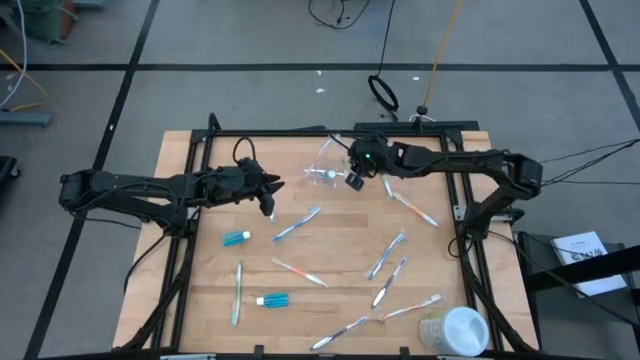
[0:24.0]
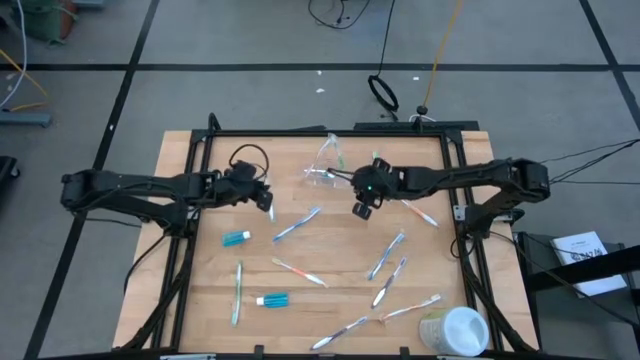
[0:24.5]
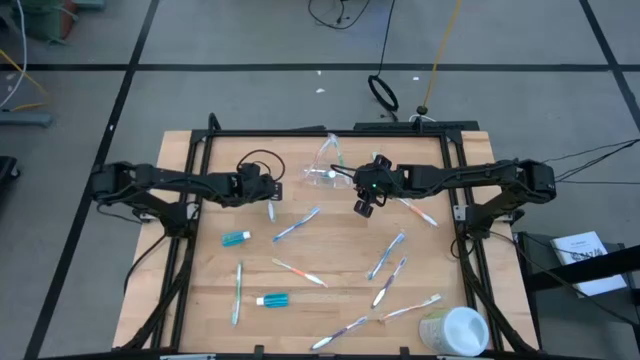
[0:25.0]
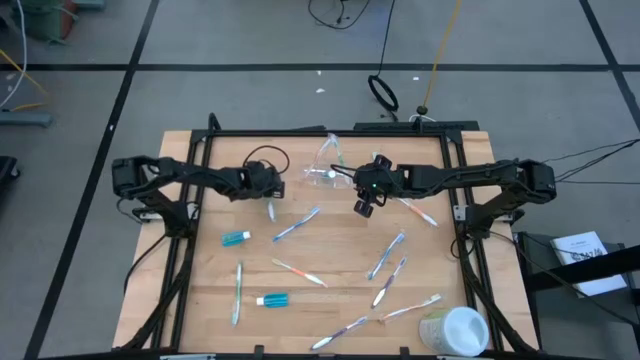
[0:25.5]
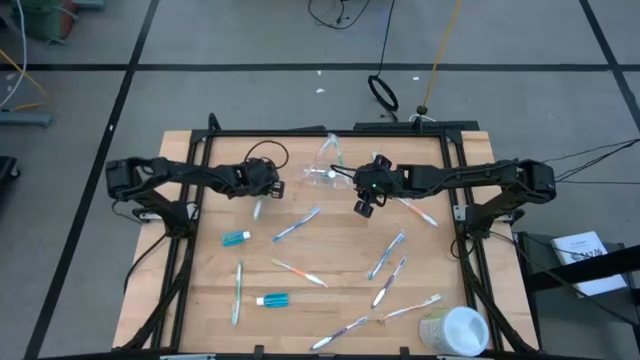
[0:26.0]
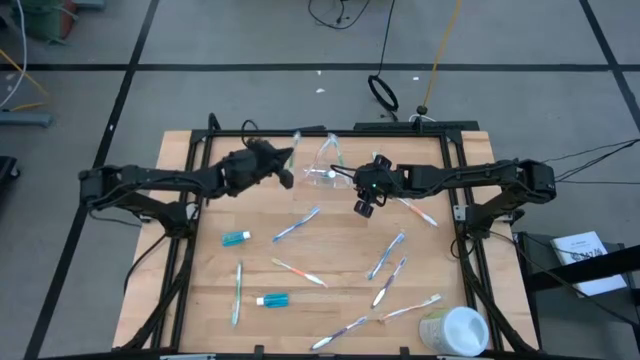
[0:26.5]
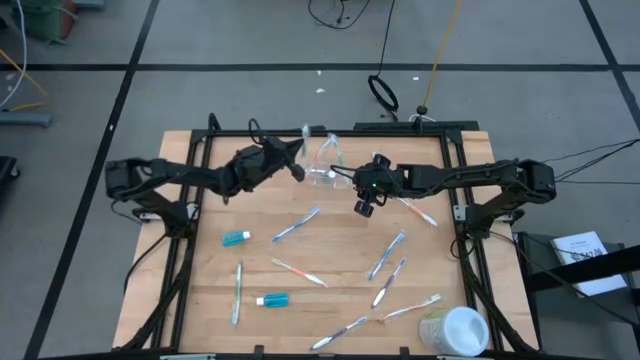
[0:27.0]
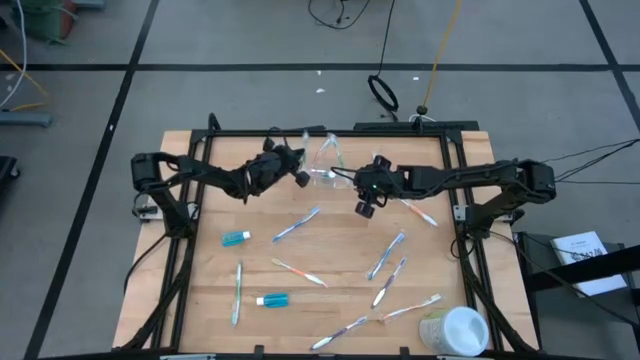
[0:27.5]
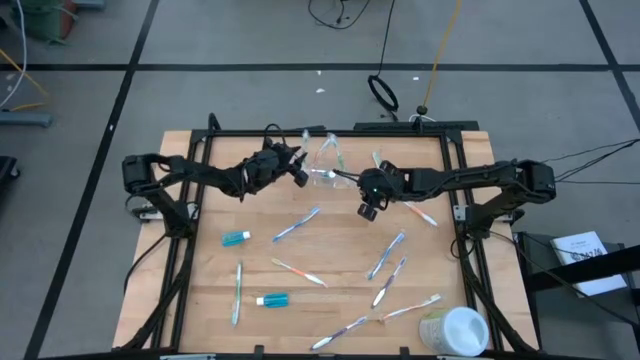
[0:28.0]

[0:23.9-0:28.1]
Task: Pick & Place toothbrushing station
Put the green toothbrush into the transparent bin organizer

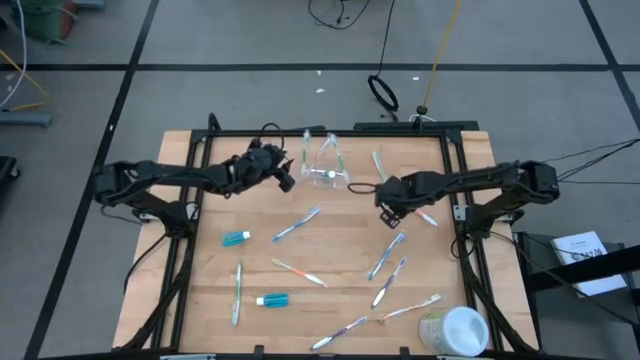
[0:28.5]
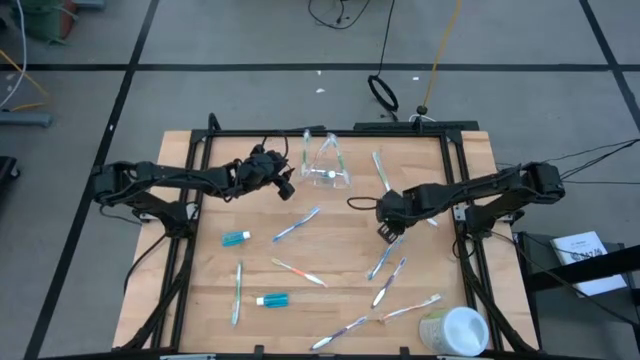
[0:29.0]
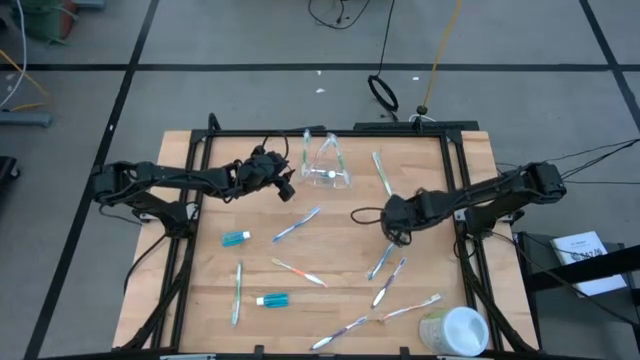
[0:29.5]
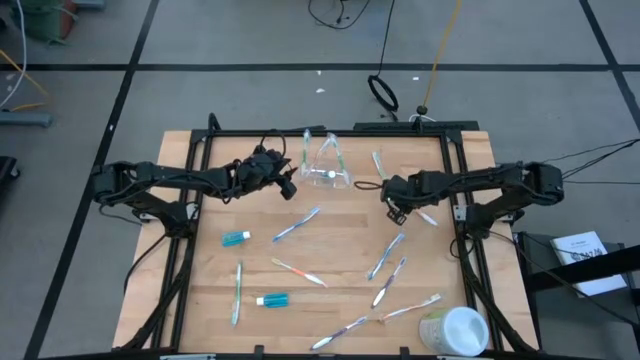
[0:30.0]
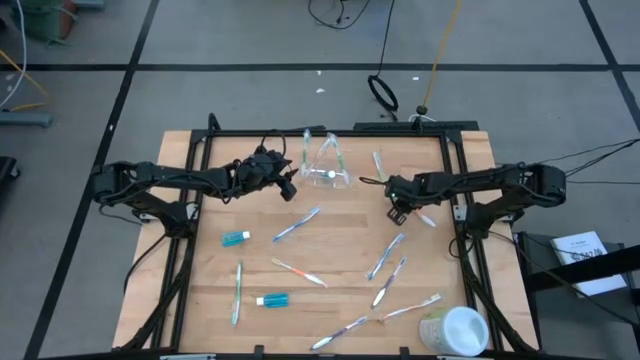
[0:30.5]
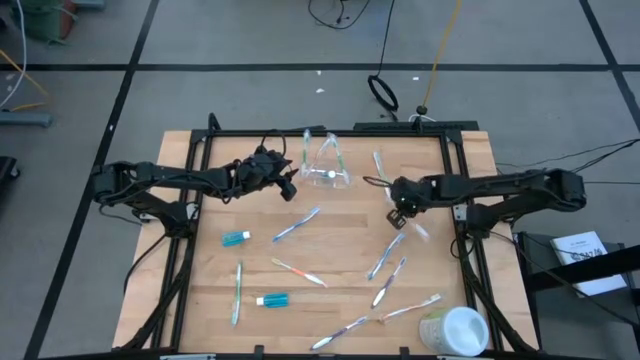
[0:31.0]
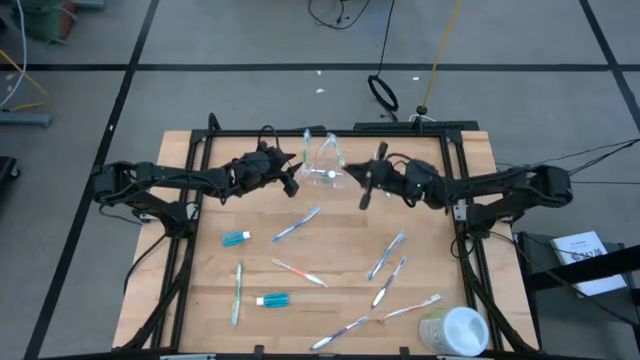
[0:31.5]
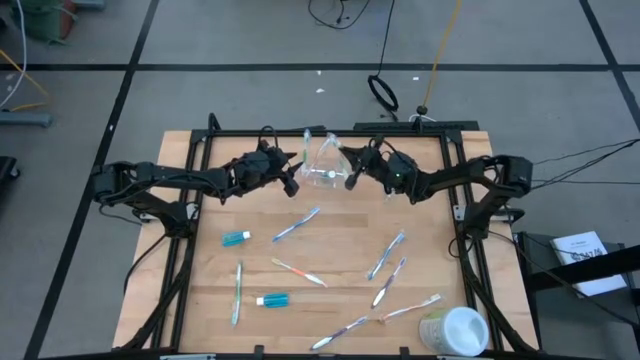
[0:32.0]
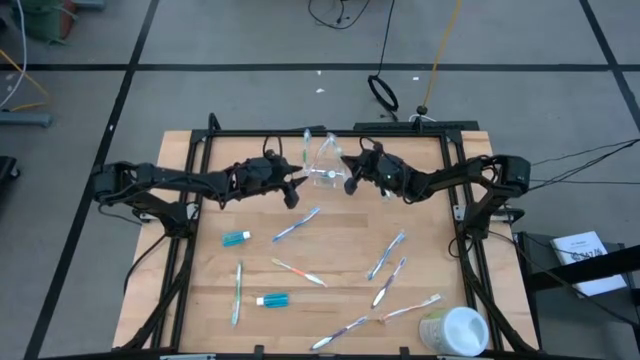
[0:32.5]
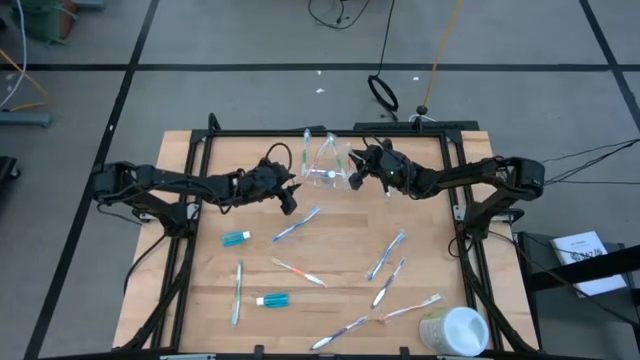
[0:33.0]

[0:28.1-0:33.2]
Put the orange toothbrush into the transparent organizer

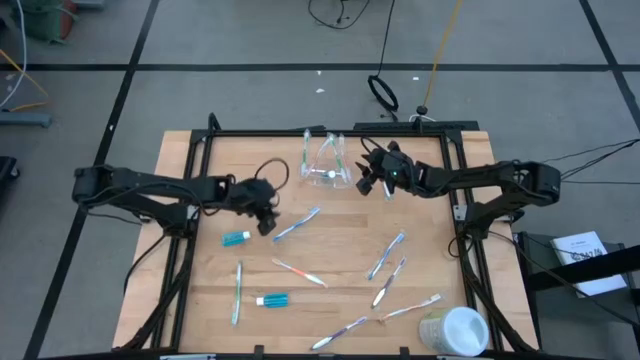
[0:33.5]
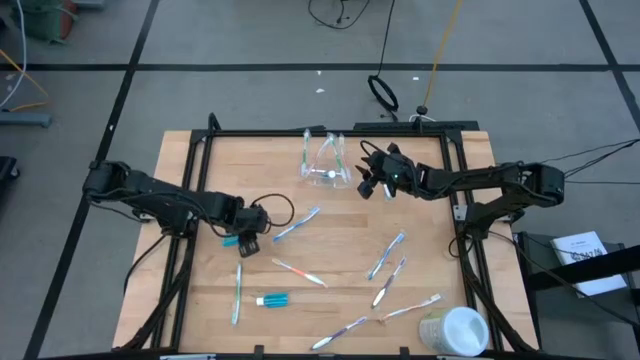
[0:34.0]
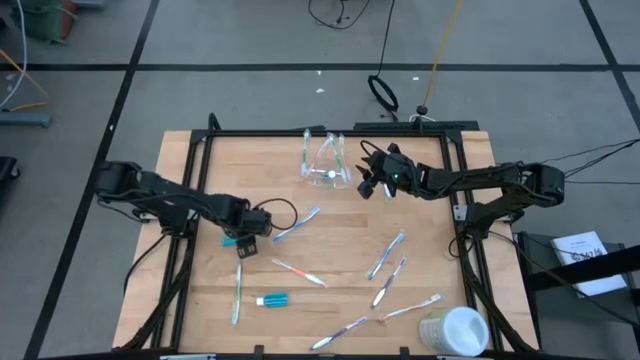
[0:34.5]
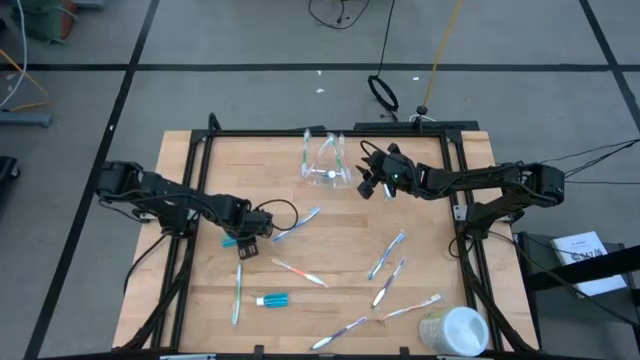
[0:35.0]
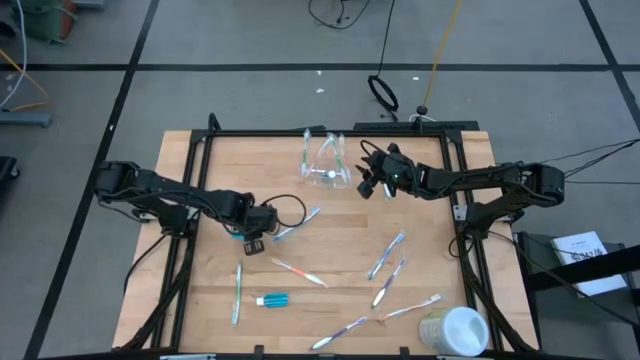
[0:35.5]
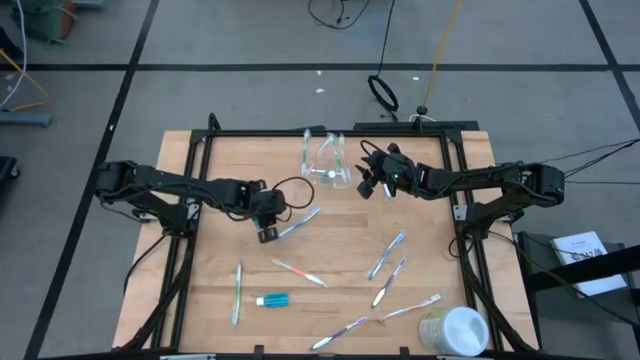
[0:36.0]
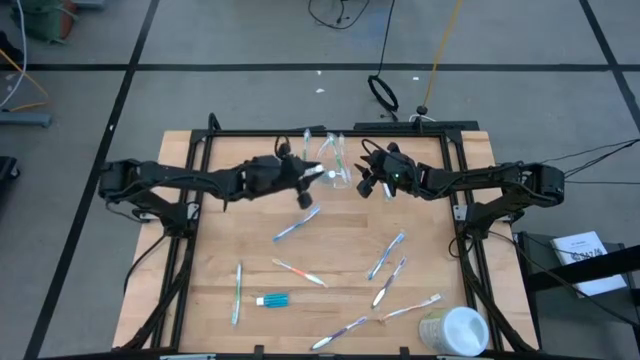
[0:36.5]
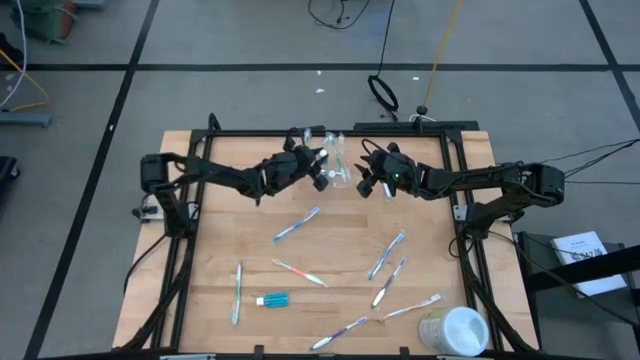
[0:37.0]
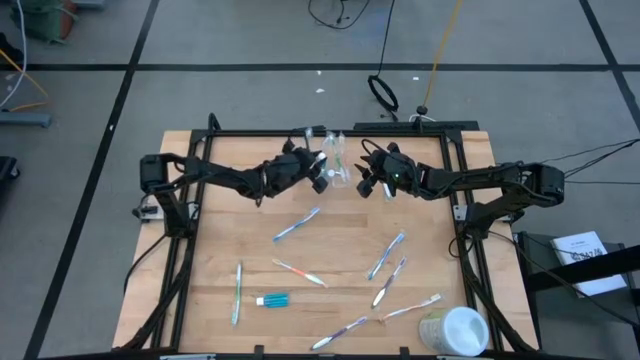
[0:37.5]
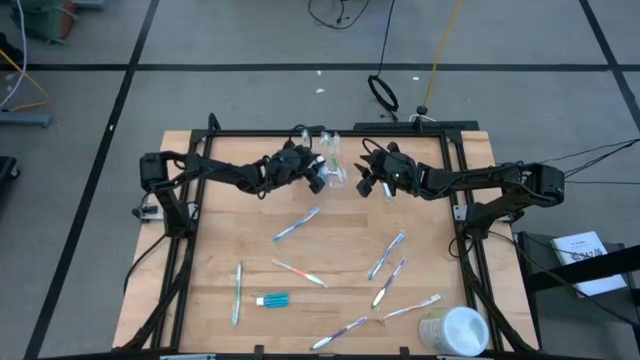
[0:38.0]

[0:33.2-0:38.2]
Put the blue mouthwash into the transparent organizer

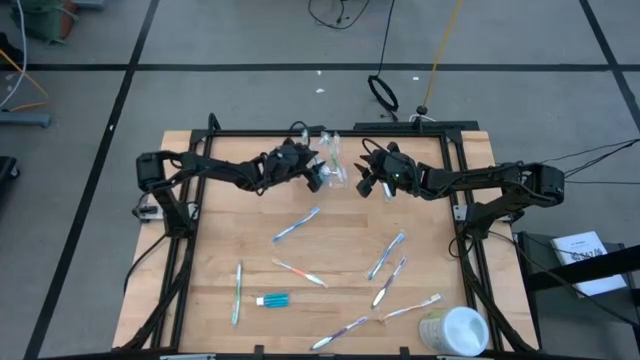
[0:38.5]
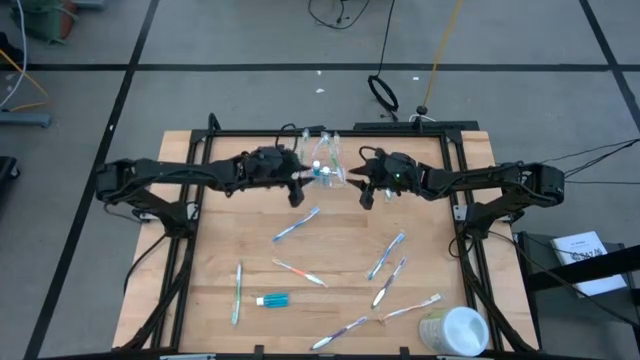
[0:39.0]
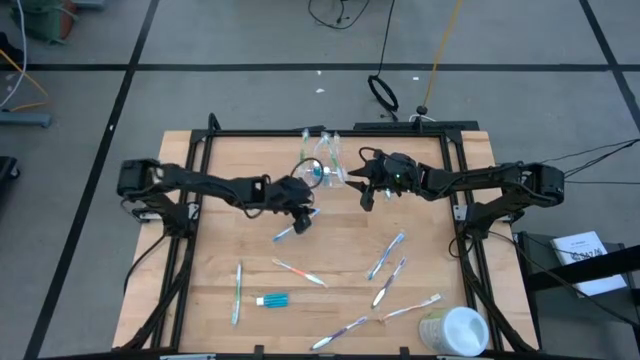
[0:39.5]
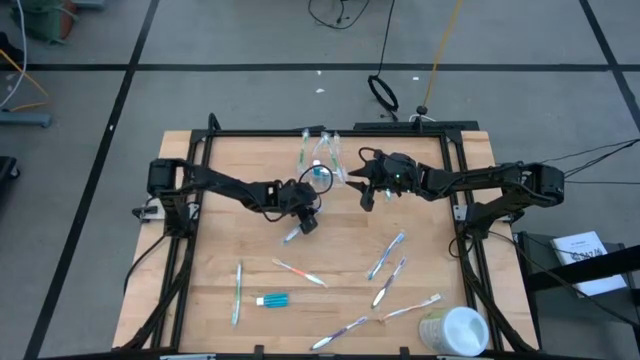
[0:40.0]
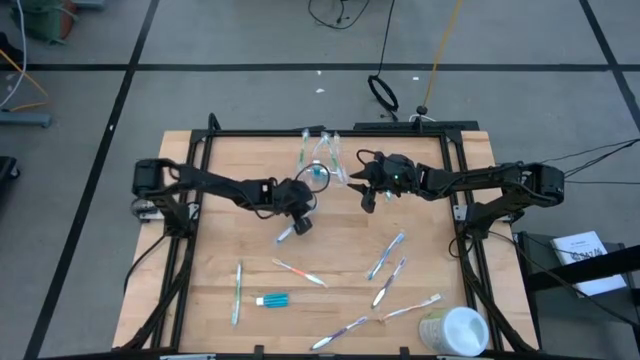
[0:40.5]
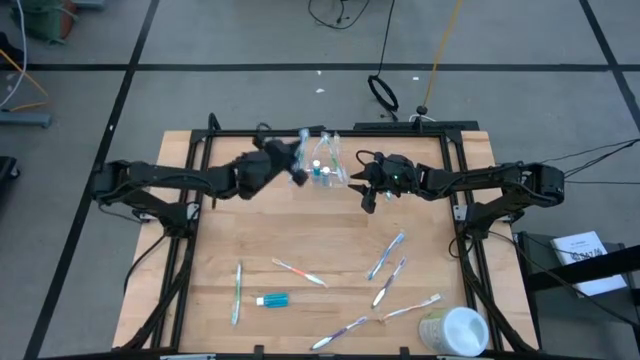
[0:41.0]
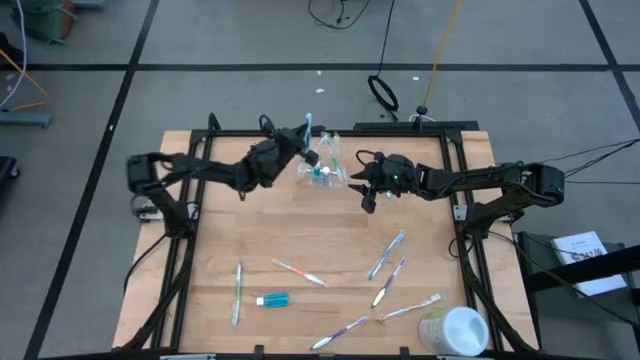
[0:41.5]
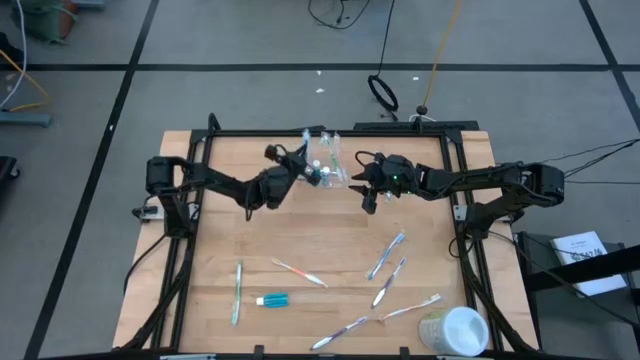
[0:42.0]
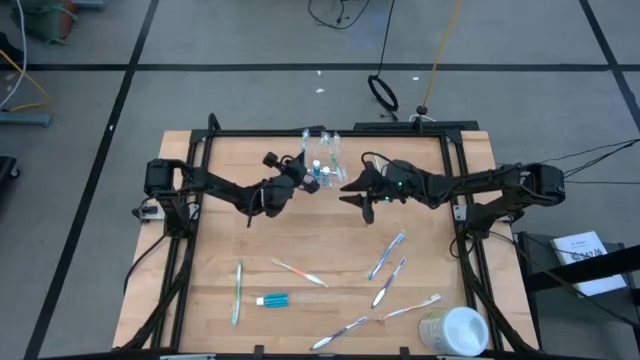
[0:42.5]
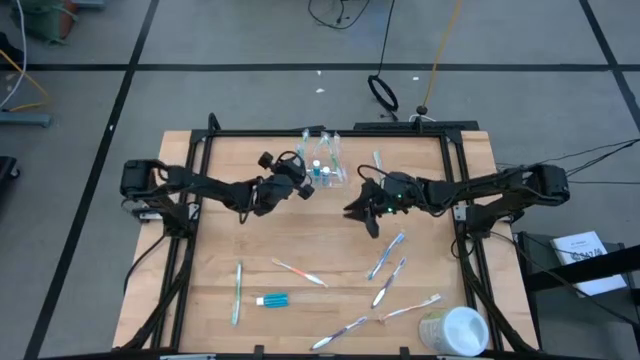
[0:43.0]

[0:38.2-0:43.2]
Put the blue toothbrush into the transparent organizer

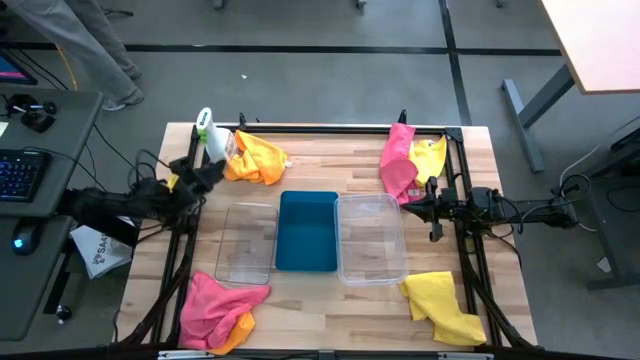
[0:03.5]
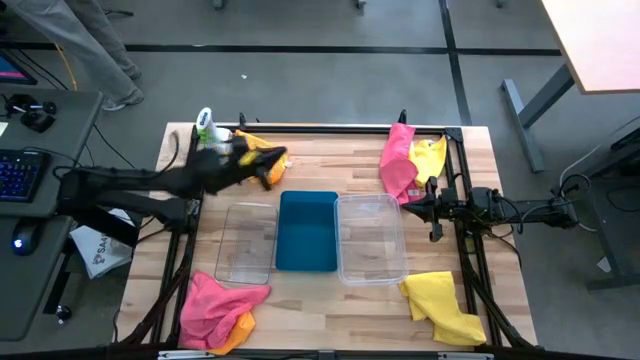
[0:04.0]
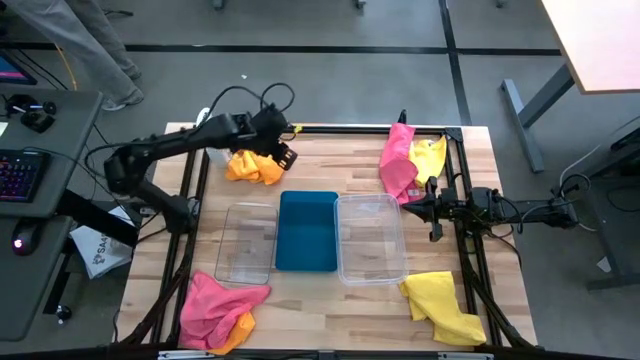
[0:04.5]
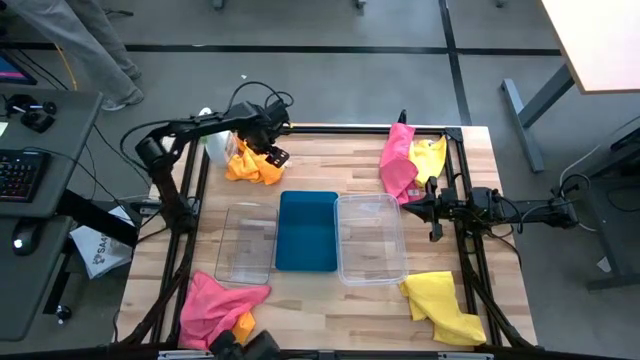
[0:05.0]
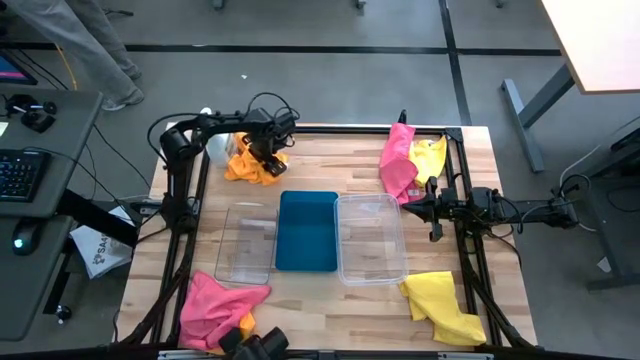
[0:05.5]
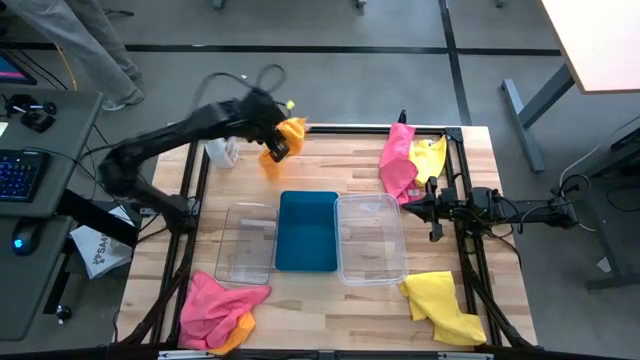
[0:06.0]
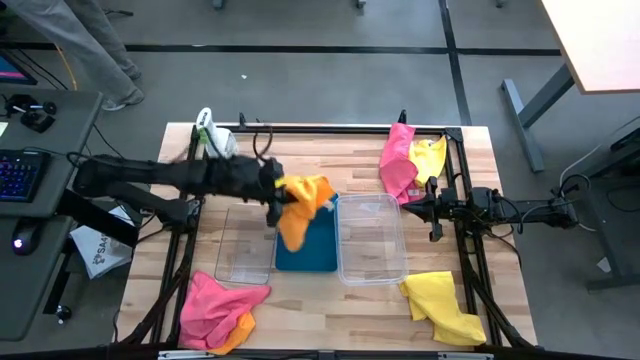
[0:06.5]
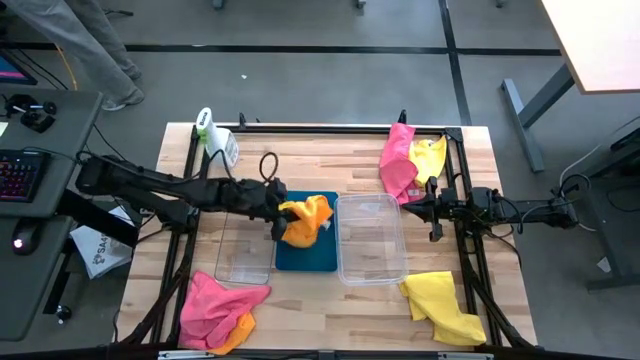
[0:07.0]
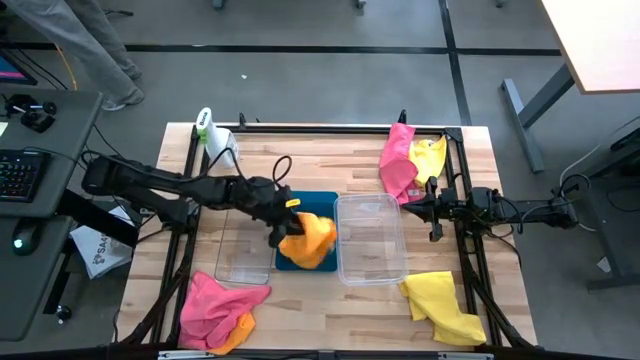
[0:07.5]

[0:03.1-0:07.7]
Task: Sort microfiber towel by color & place in baskets
Put the top orange microfiber towel into the blue bin
